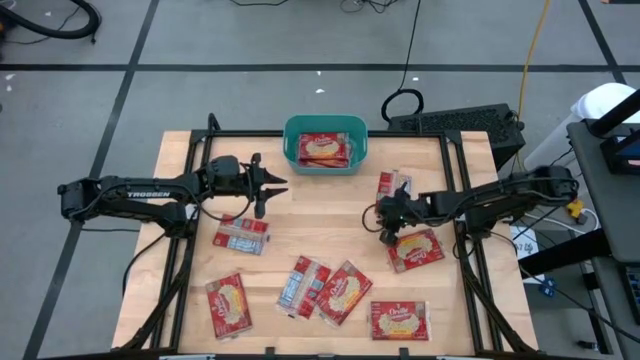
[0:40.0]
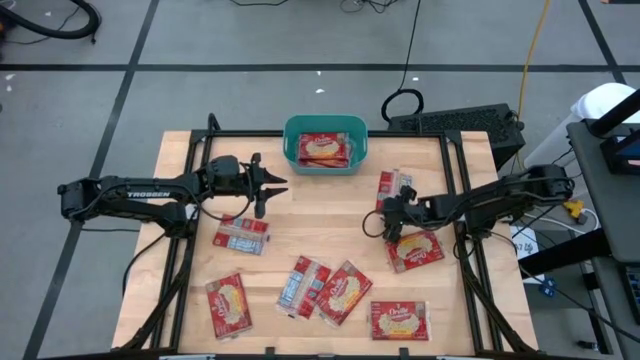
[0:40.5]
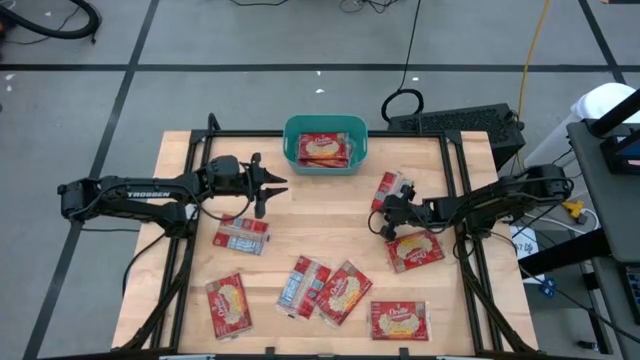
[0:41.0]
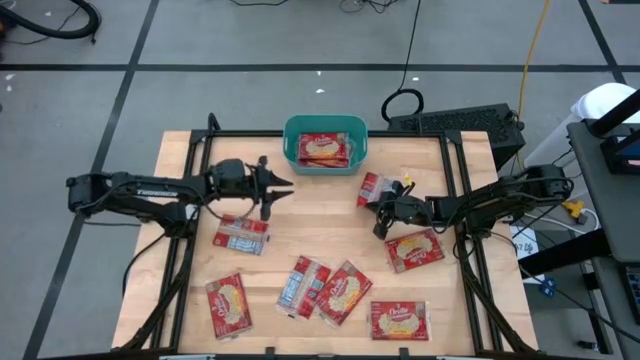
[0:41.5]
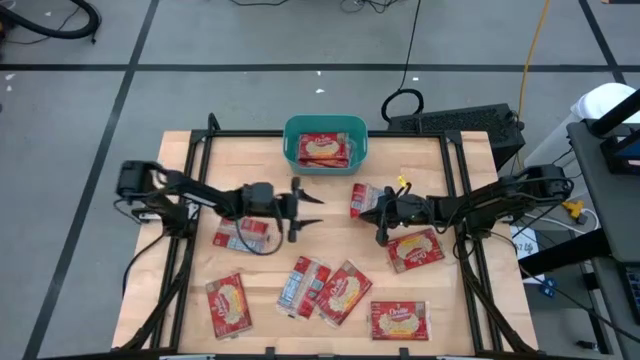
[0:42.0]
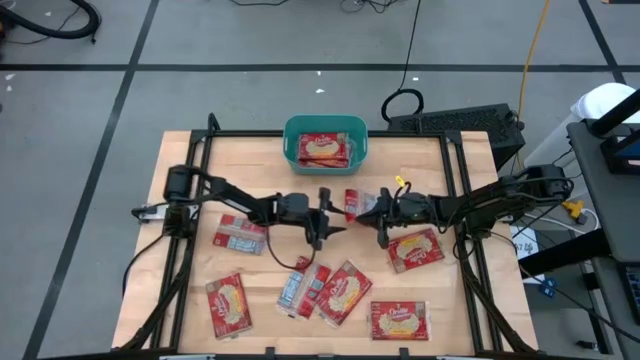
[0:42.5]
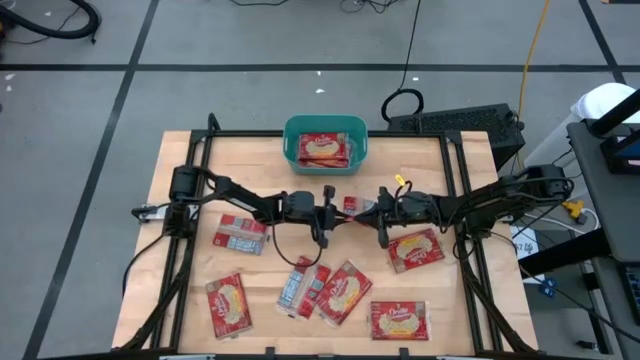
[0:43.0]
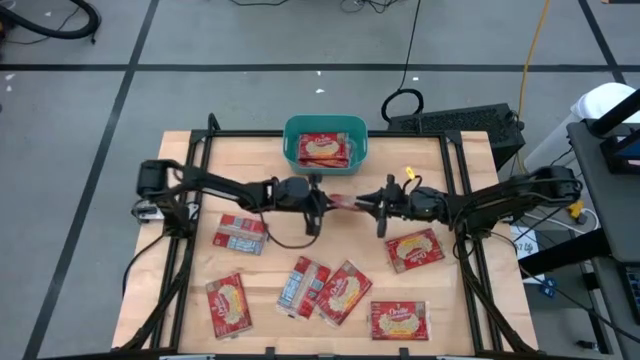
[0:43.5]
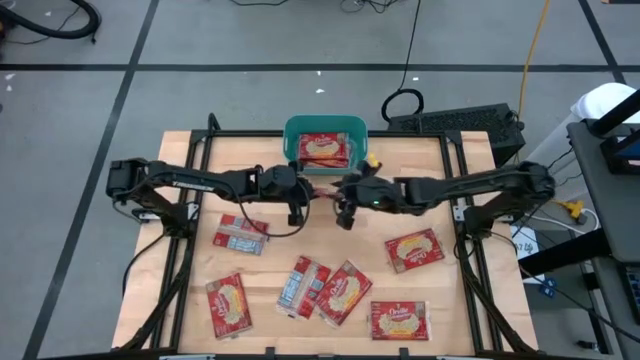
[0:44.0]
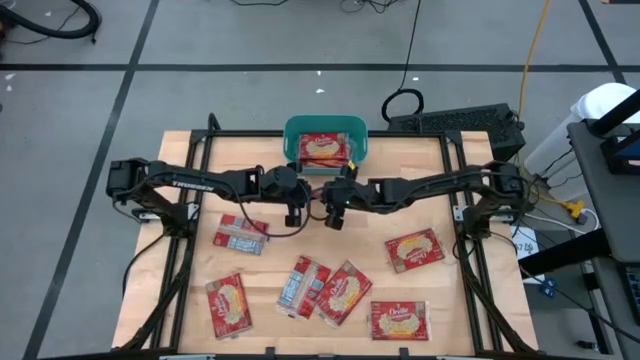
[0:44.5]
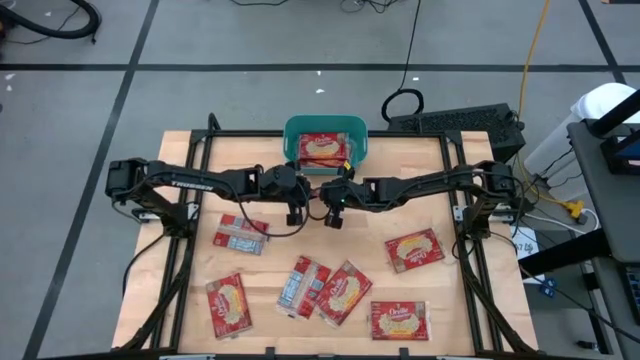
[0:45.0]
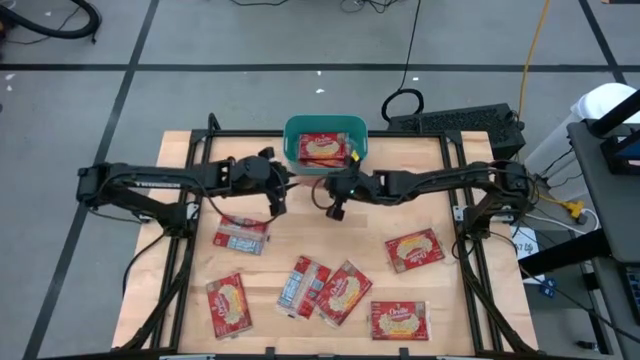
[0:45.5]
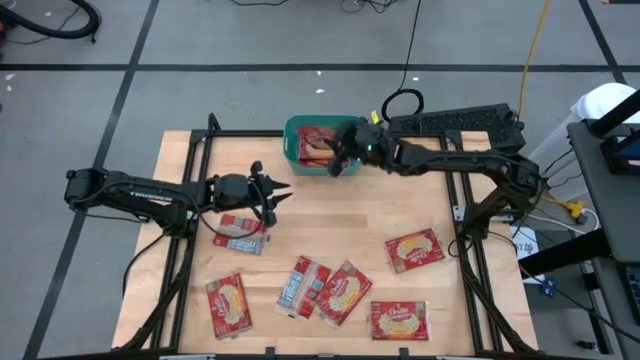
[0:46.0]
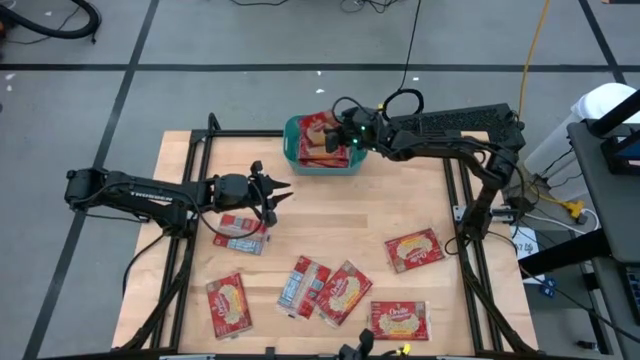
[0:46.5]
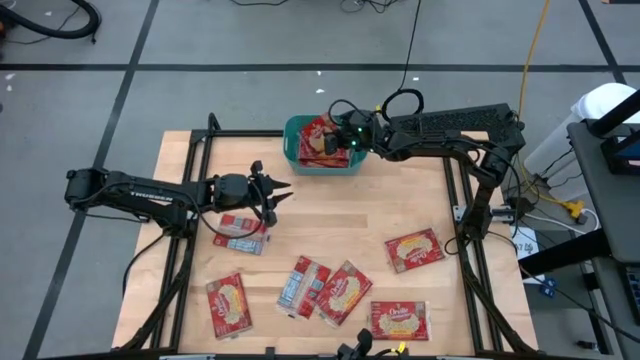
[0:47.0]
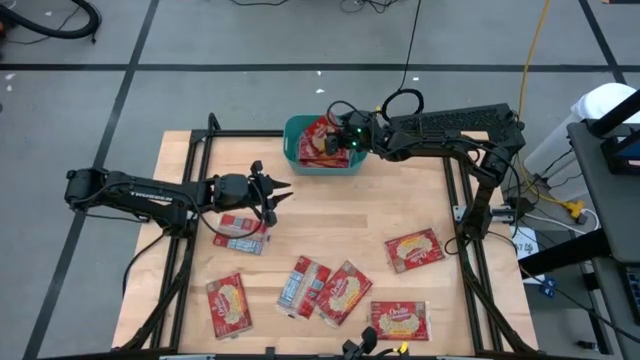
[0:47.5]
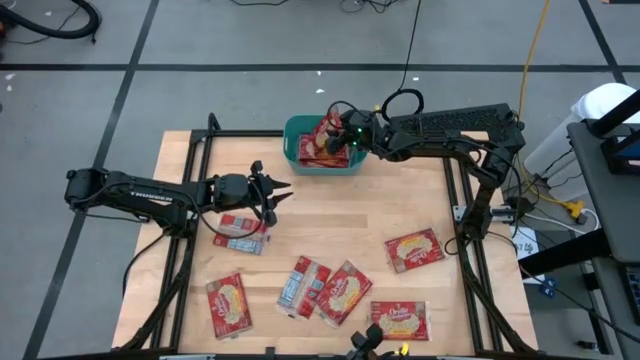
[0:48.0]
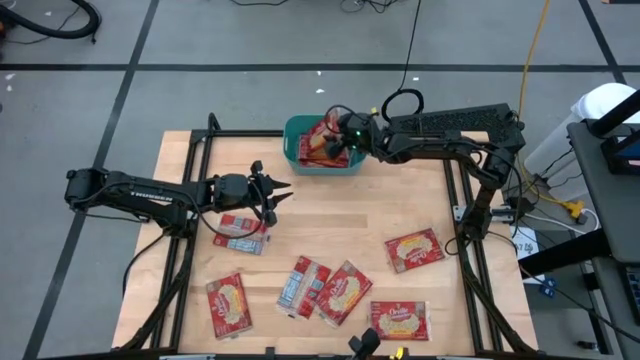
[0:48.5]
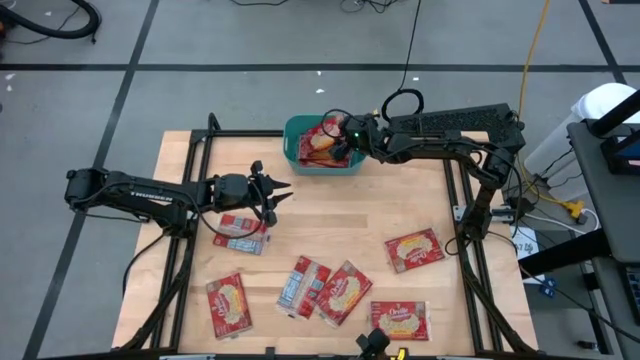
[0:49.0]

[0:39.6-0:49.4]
Task: Sort popcorn bags into baskets
Put the red popcorn bag into the green bin

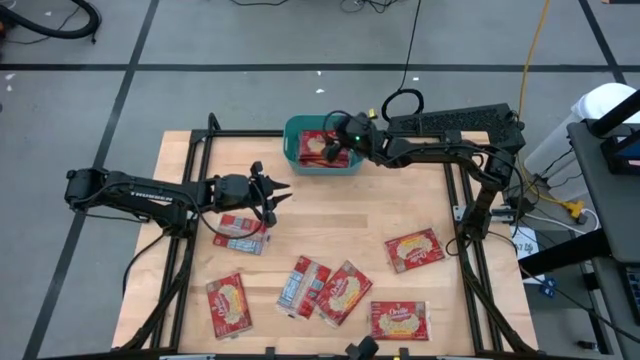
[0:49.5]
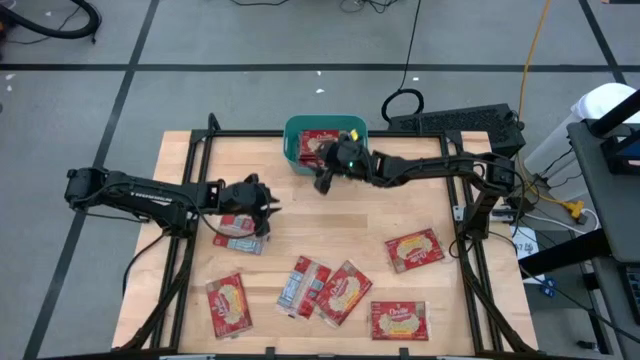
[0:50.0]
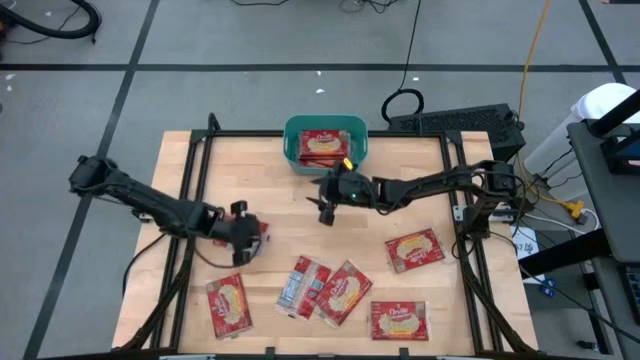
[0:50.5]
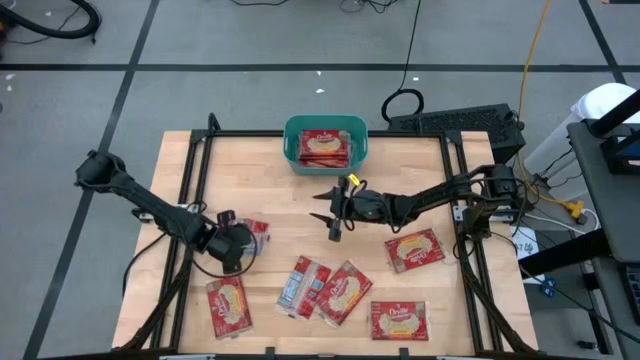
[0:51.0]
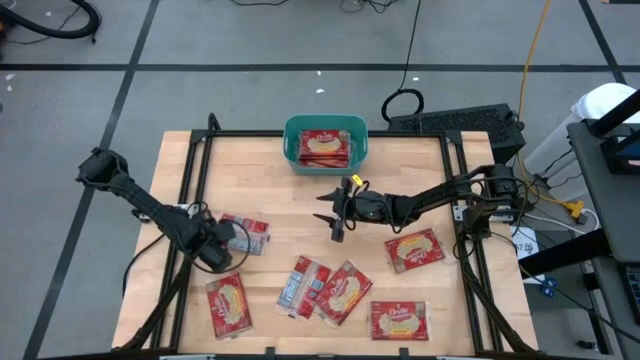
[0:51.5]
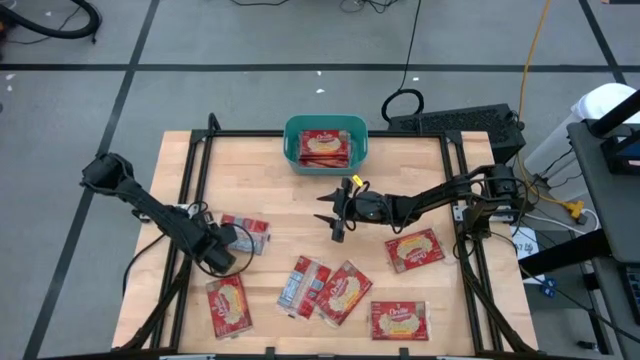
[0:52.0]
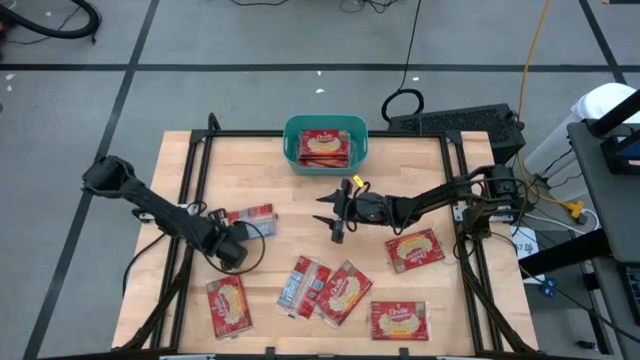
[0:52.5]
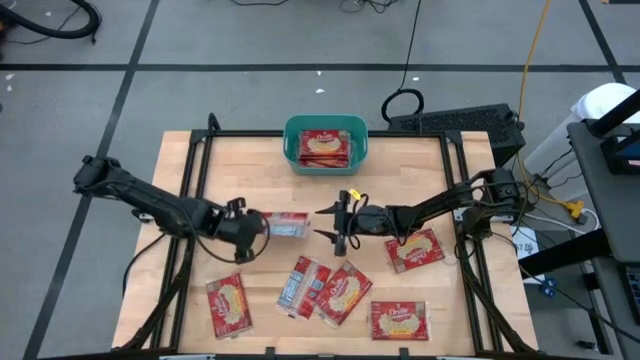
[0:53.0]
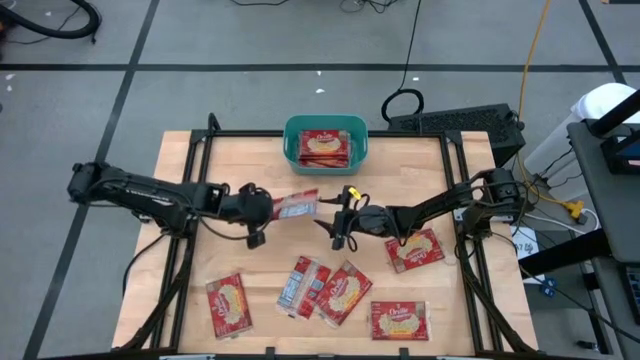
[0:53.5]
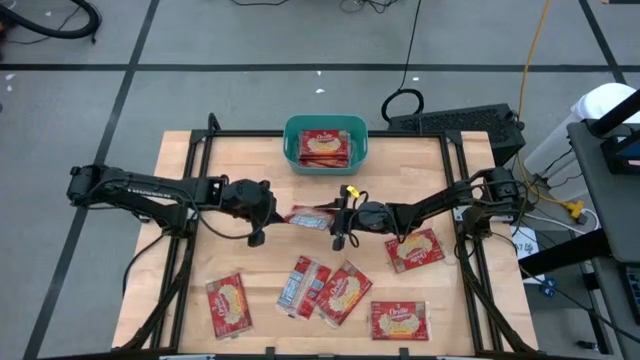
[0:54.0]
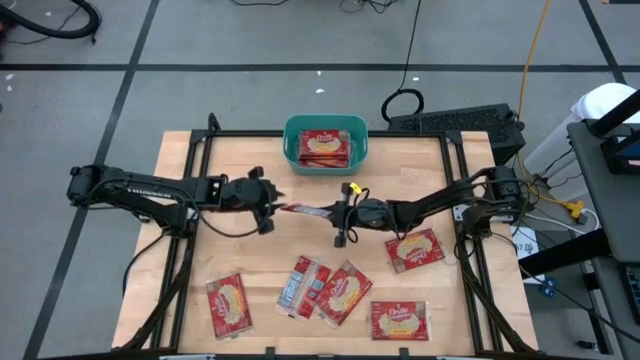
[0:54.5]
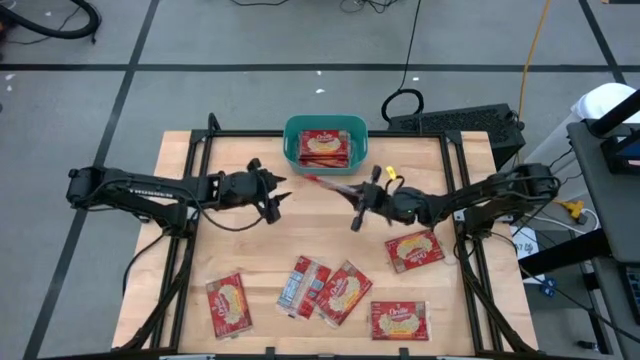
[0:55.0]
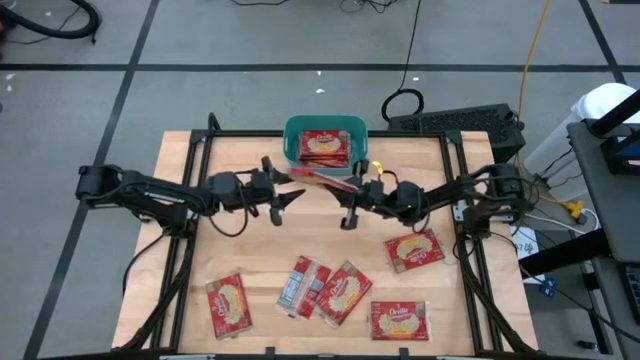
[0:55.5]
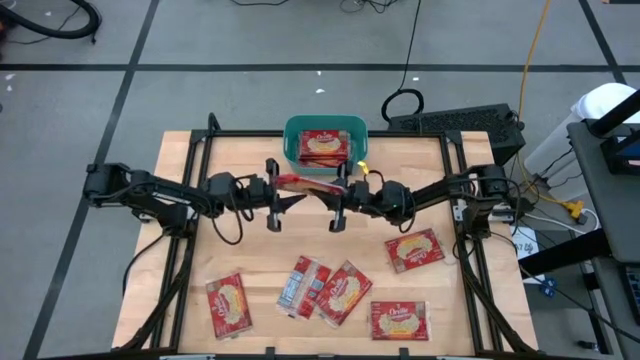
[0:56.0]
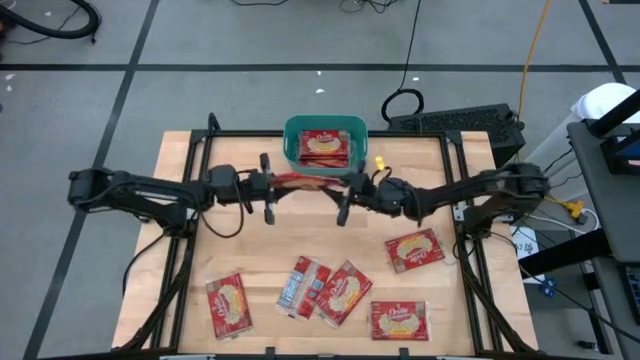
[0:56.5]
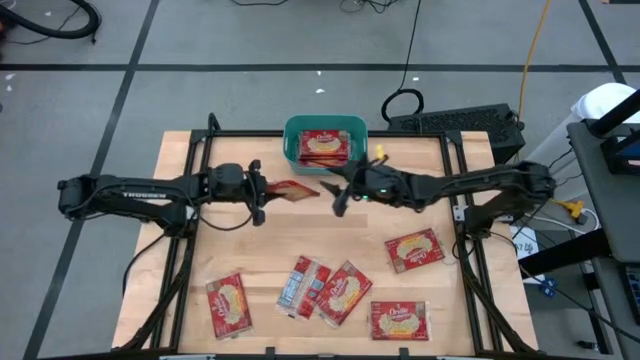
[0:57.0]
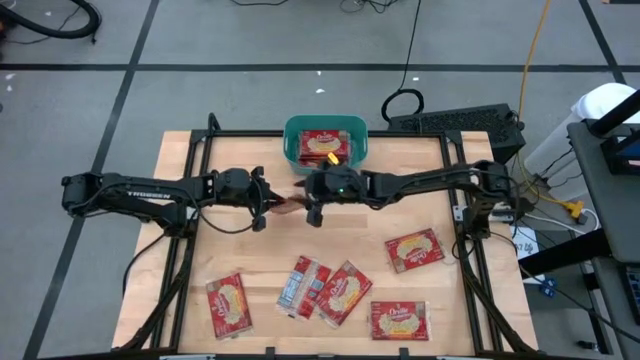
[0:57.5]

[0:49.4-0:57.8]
Put the red popcorn bag into the green bin

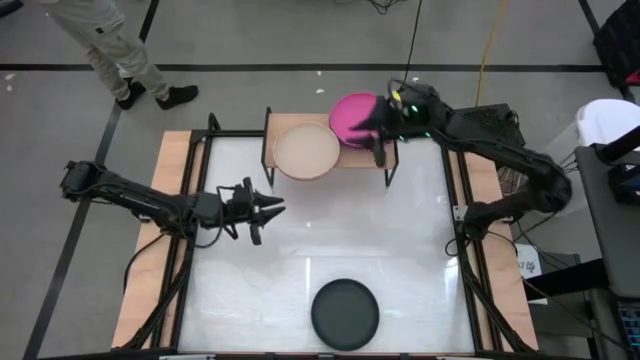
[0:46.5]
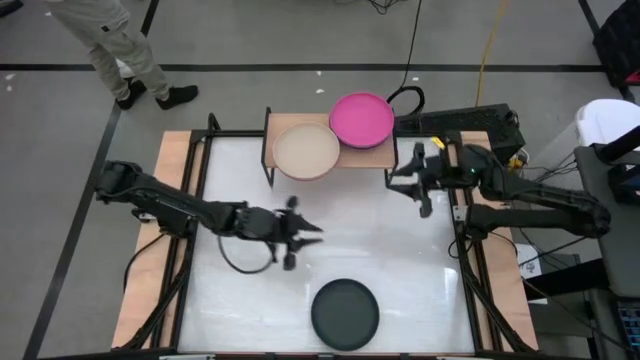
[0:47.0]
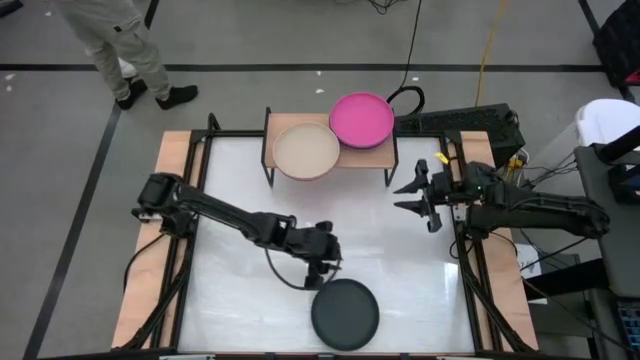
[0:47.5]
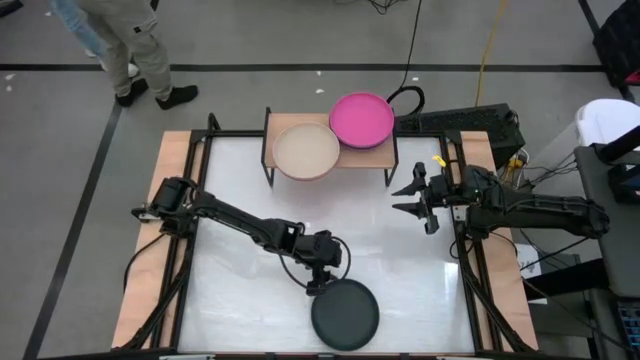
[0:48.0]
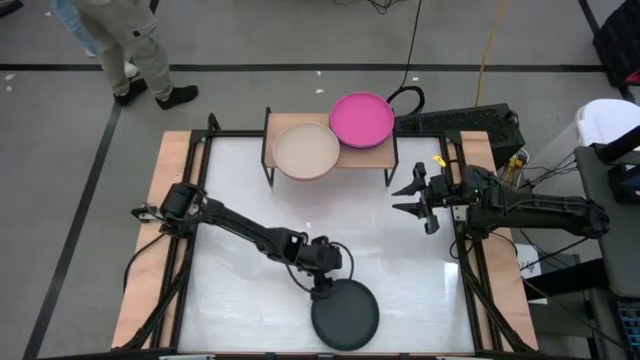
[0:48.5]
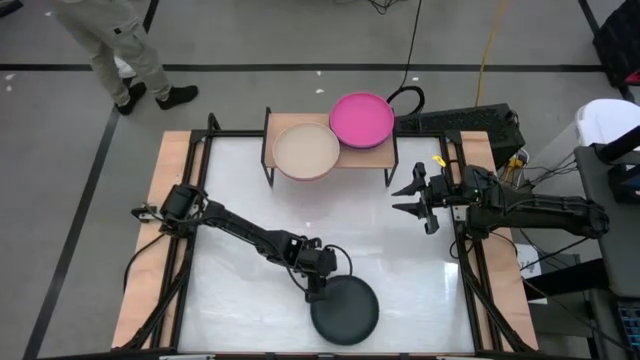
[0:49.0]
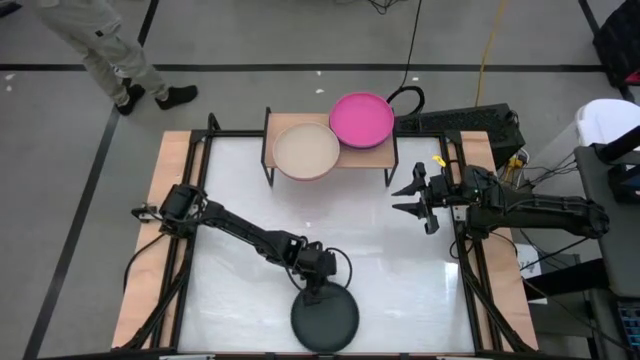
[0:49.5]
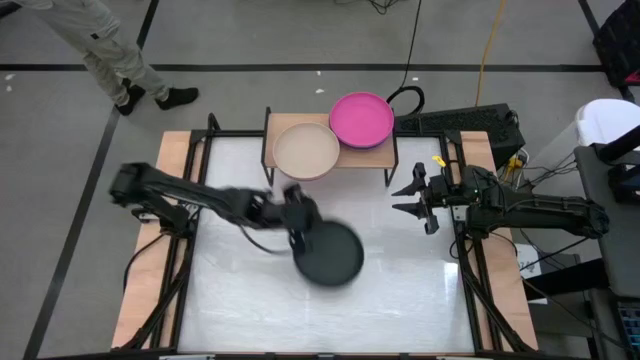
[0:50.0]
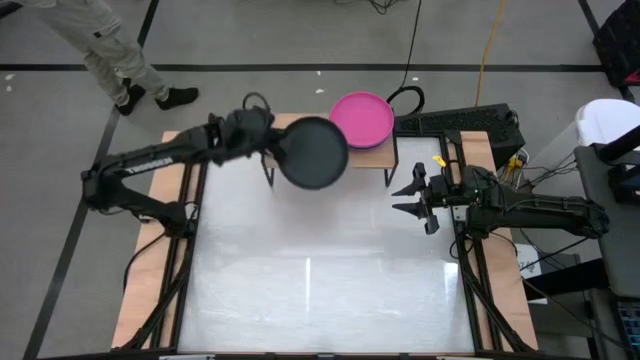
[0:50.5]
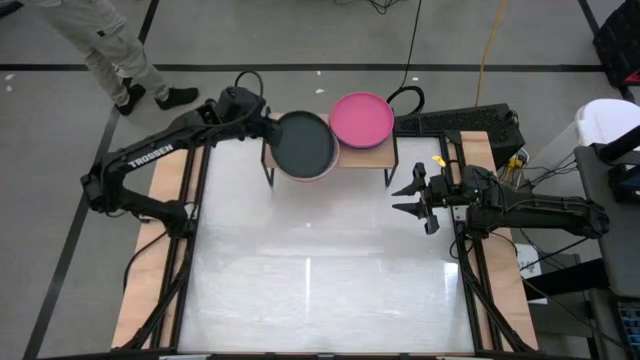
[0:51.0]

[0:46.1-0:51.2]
Task: Place and stack plates onto a shelf
Stack the black plate on top of the gray plate on the shelf
